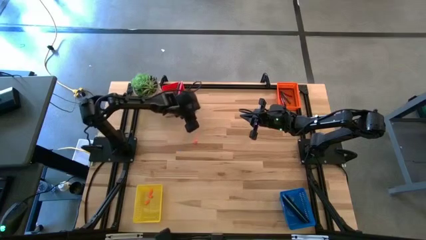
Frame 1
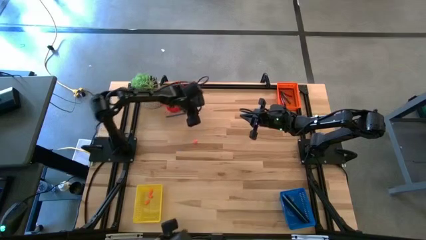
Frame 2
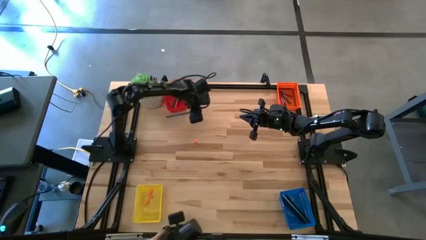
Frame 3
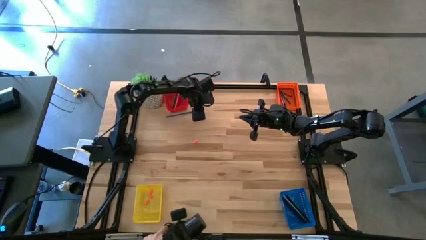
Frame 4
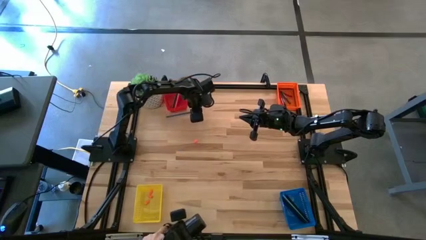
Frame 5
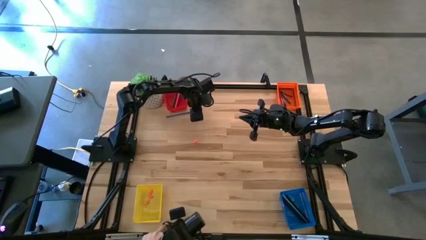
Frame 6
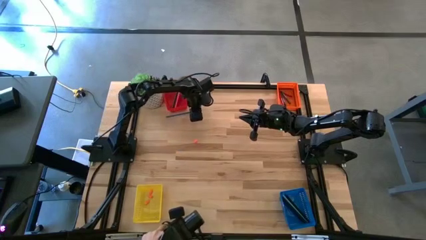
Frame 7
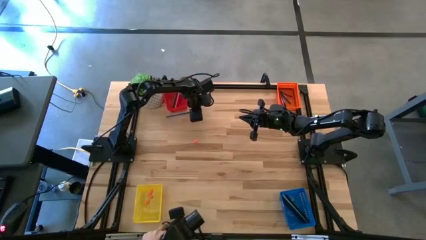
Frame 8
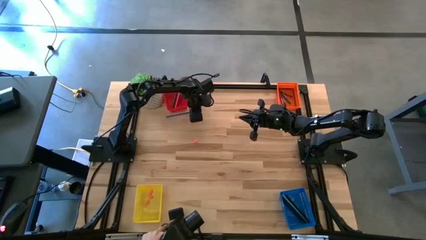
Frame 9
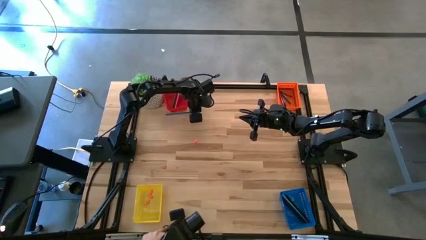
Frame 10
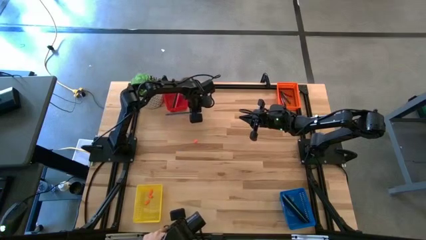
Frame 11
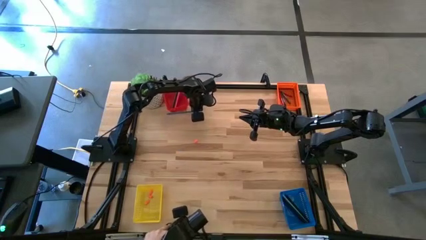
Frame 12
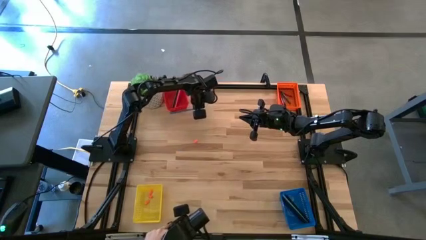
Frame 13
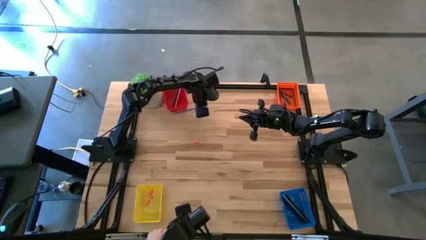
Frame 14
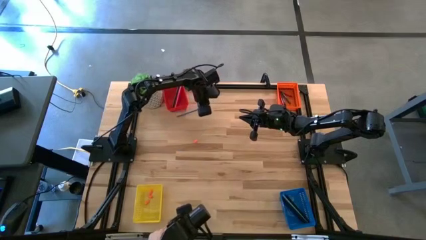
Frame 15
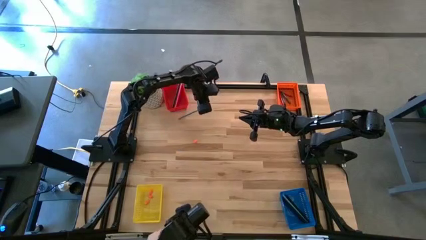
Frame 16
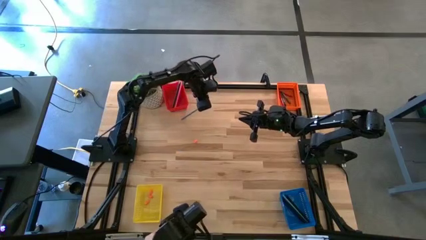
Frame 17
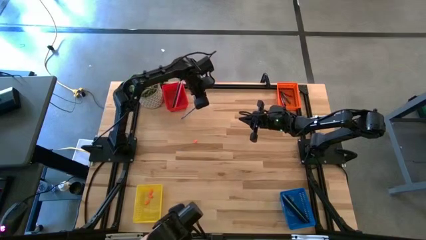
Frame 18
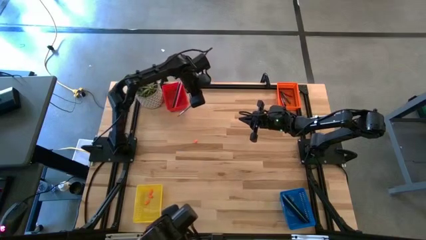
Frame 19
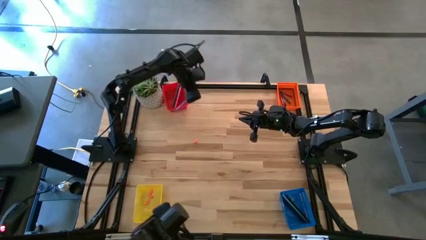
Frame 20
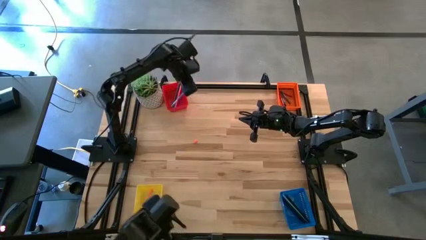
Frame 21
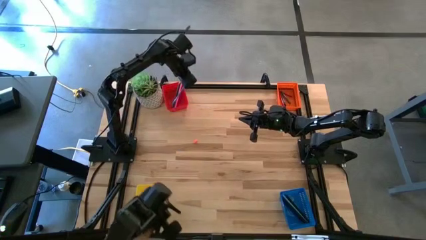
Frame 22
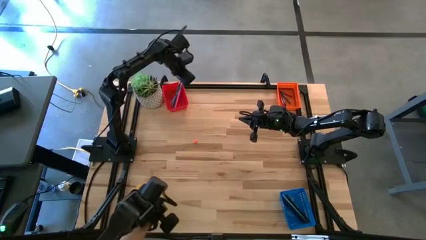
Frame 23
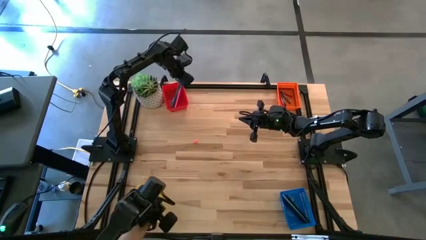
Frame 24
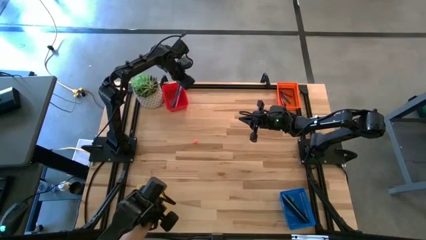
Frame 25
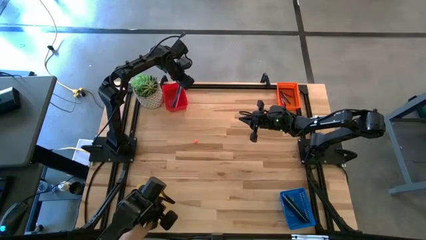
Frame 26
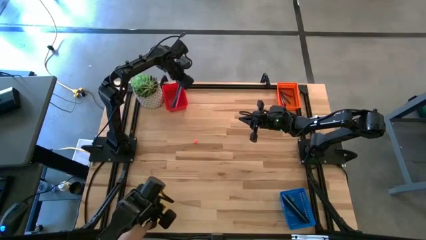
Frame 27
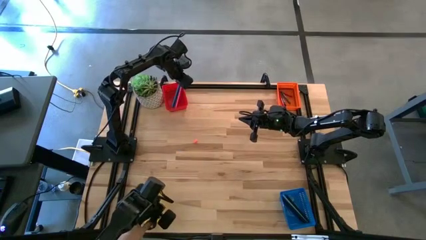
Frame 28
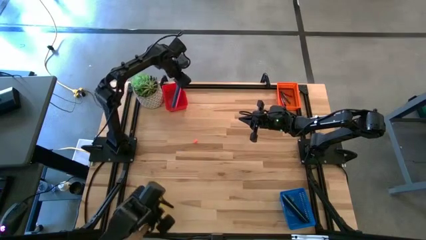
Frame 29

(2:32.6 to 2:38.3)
Task: Sort crayons/erasers/pens/pencils in bins
Put the blue pencil into the red bin

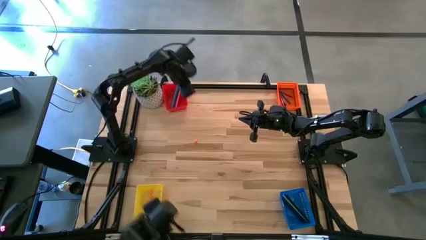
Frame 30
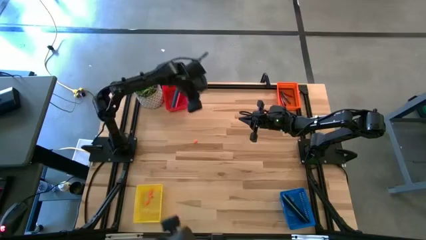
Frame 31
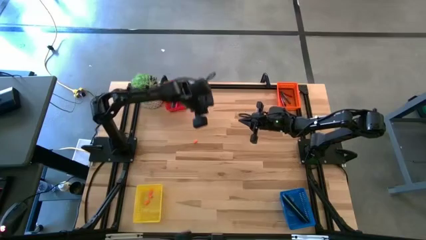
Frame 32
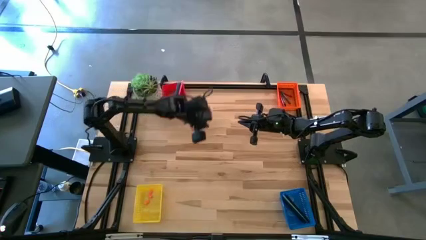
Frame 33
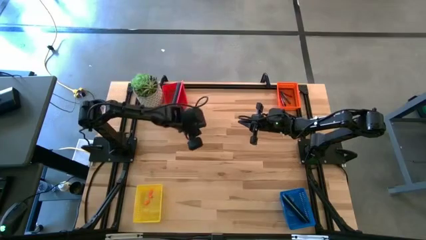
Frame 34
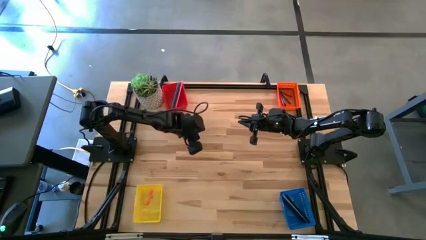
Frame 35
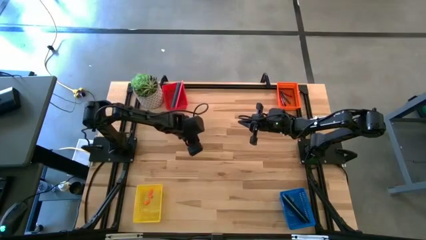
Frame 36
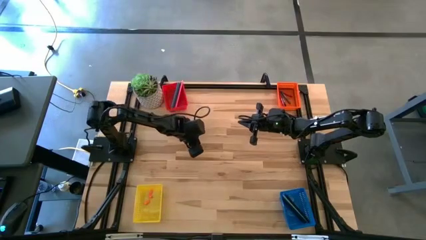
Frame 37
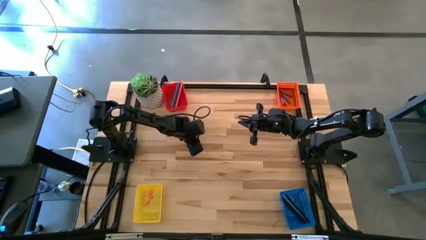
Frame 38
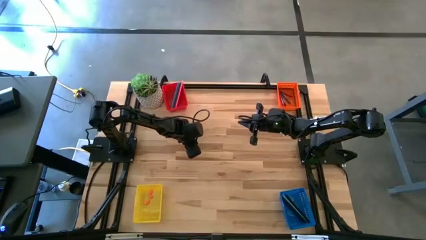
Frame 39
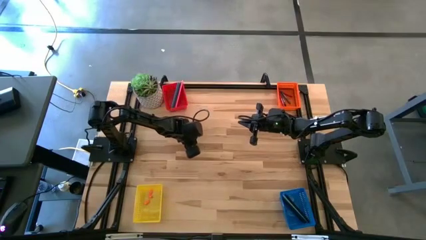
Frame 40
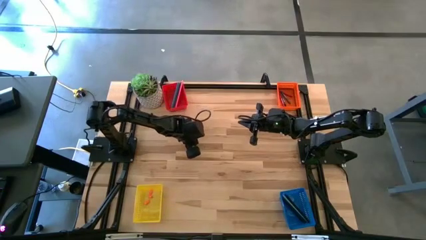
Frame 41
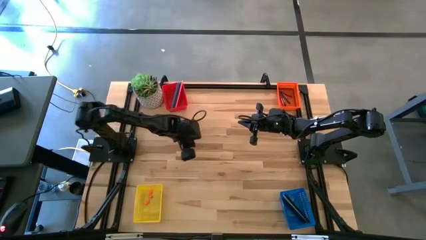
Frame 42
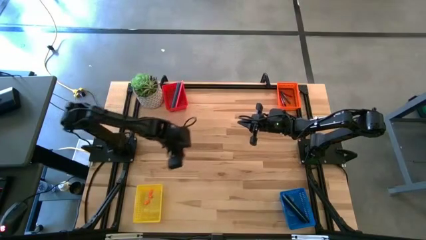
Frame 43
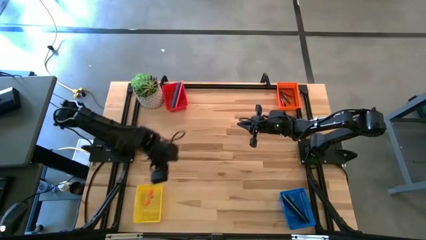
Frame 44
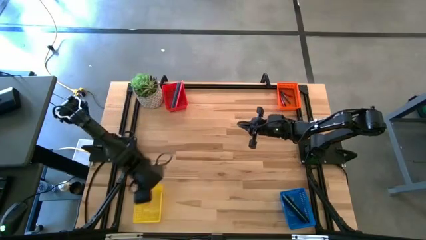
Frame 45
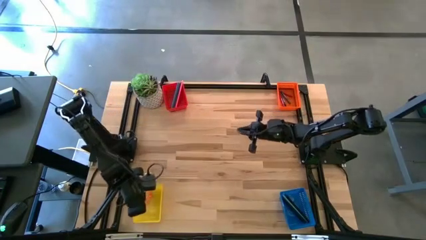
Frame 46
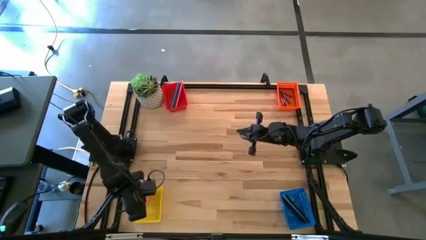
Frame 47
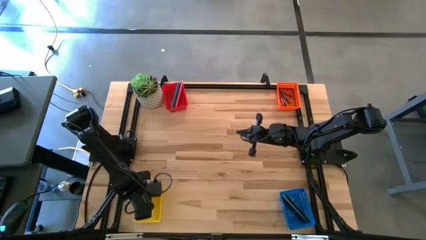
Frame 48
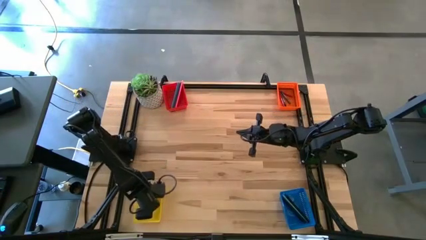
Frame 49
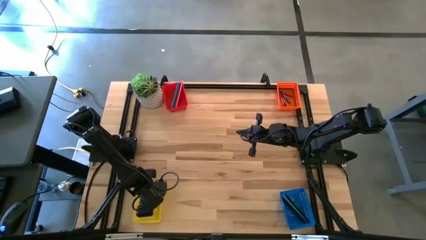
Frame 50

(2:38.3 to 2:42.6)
Put the orange pencil eraser cap into the yellow bin

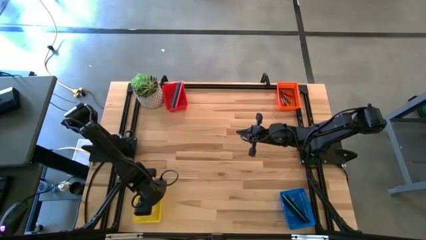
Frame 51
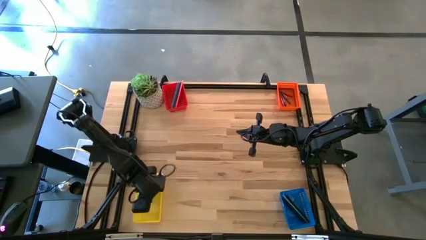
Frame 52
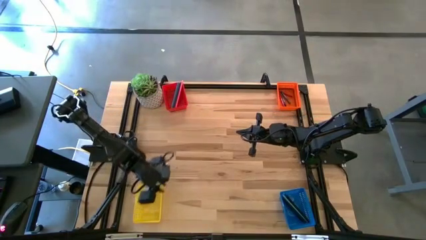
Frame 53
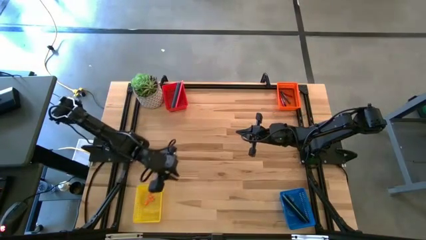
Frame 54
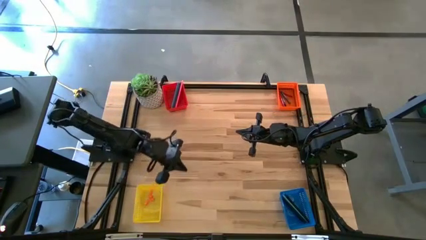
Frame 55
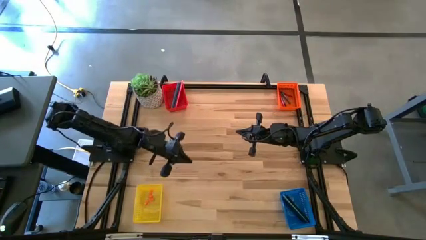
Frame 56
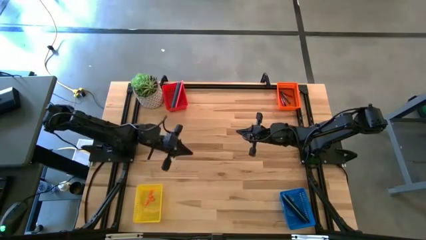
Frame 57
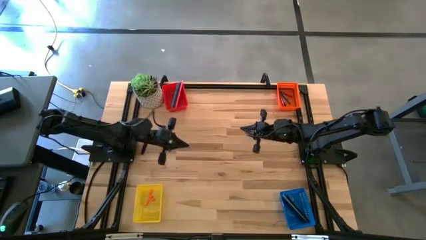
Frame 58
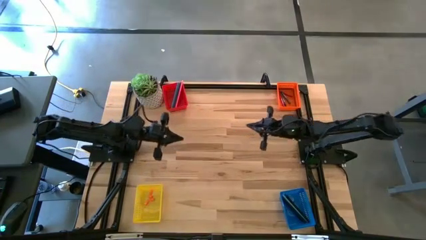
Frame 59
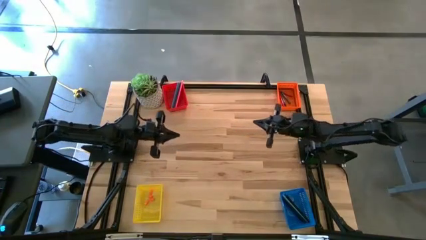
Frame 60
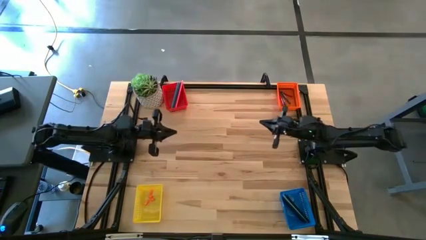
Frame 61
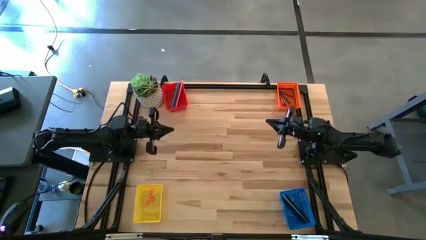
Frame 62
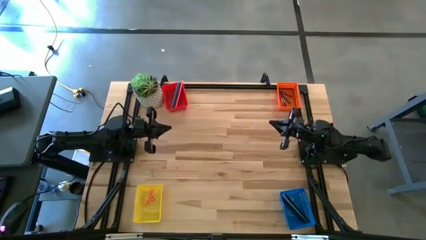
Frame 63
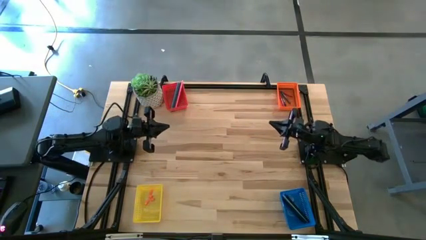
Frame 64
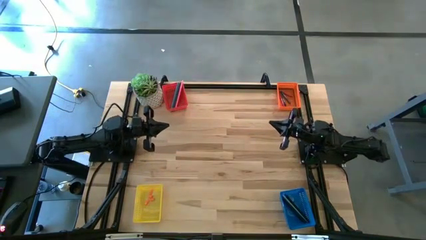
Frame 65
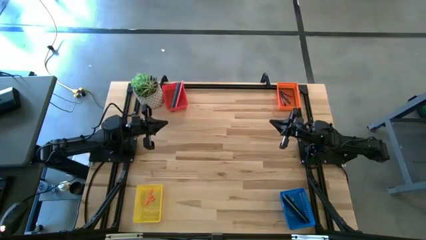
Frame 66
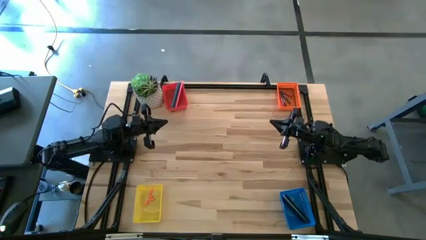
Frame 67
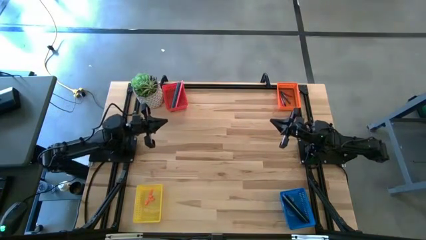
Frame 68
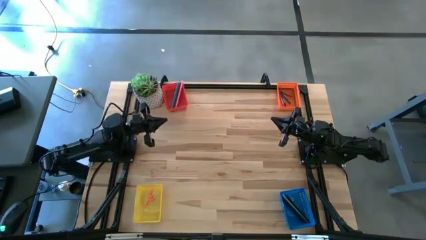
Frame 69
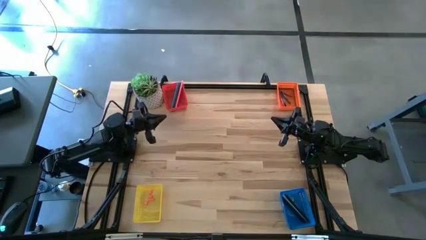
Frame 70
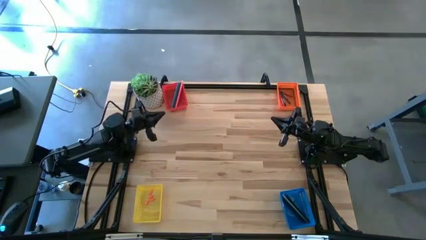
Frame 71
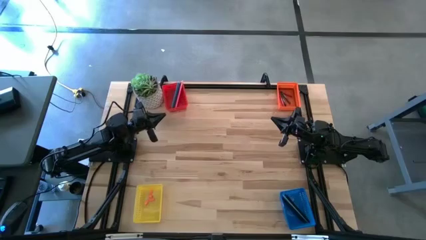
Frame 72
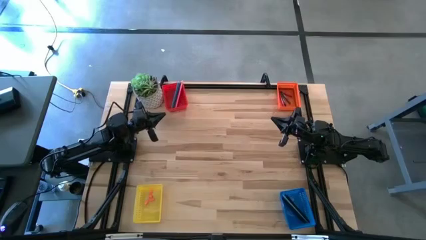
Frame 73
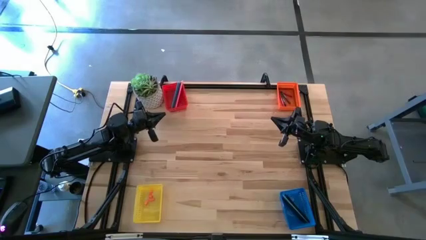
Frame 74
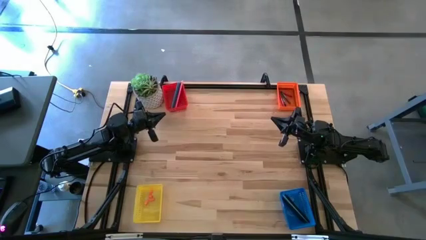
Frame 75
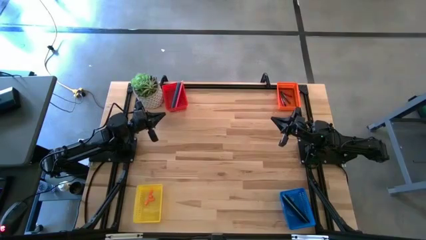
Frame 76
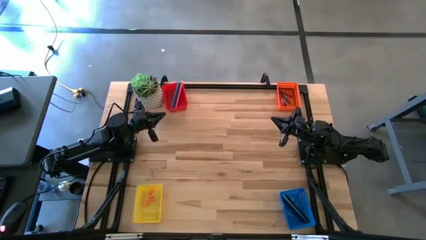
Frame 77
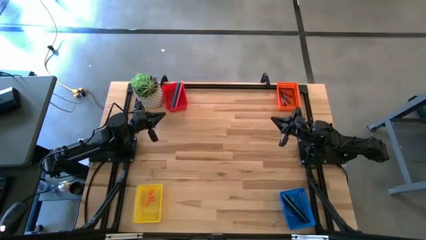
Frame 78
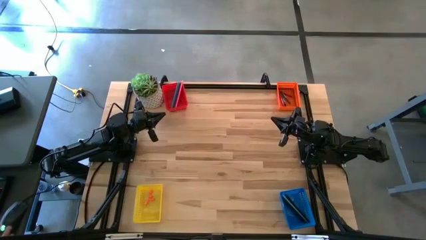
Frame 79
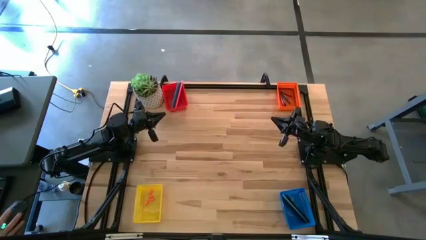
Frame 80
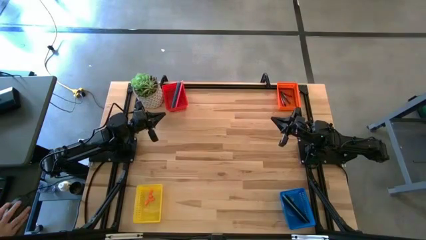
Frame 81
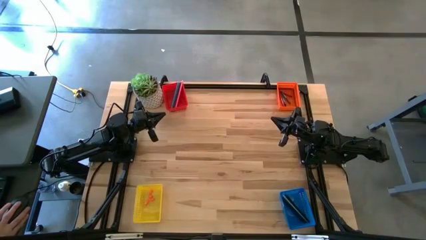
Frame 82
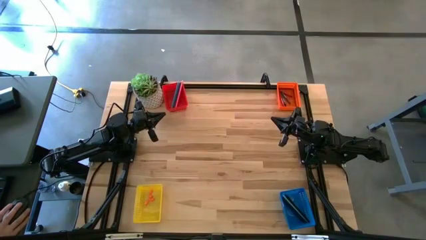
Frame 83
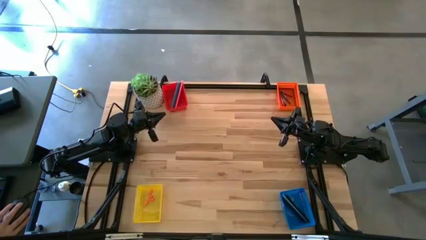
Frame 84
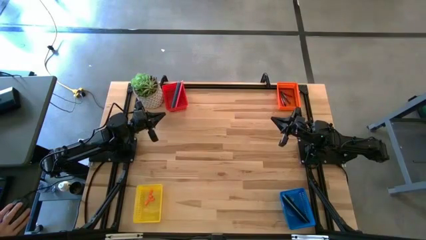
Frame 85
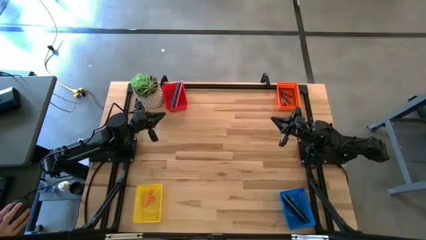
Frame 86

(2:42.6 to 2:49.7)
Return to Home Position
